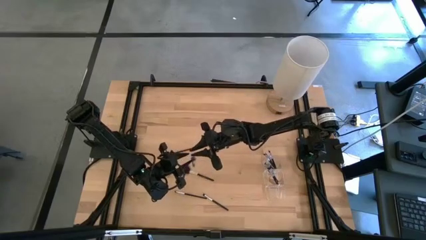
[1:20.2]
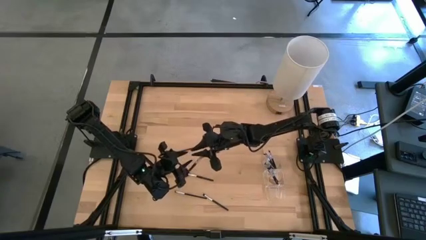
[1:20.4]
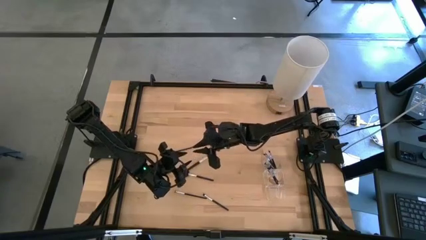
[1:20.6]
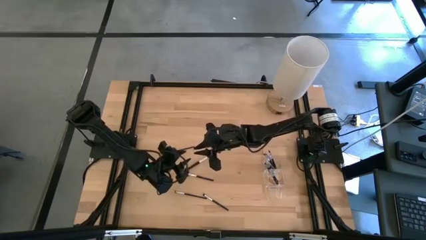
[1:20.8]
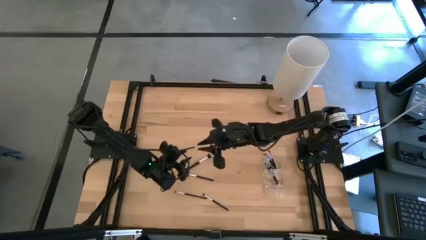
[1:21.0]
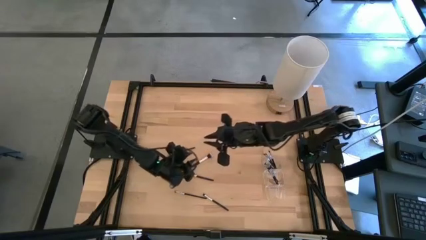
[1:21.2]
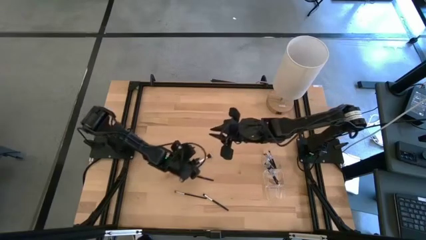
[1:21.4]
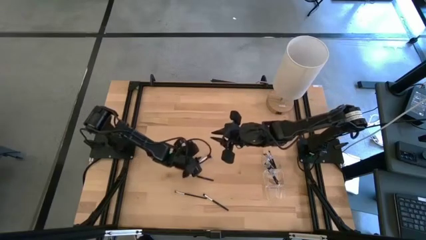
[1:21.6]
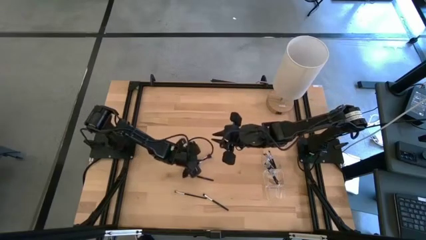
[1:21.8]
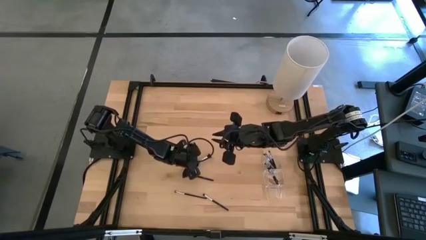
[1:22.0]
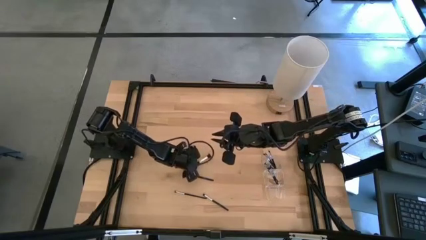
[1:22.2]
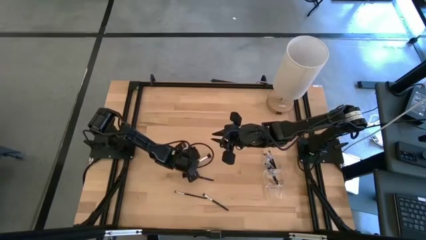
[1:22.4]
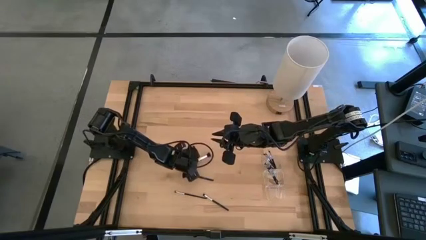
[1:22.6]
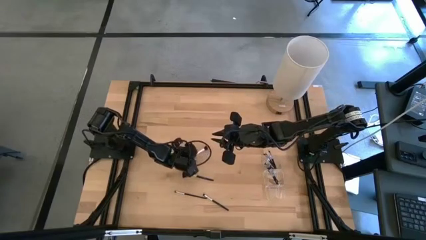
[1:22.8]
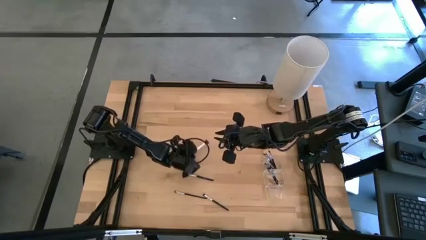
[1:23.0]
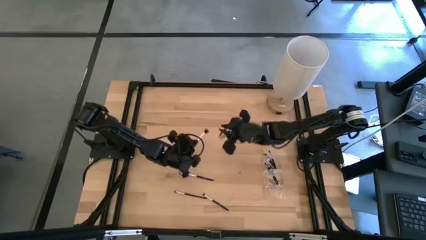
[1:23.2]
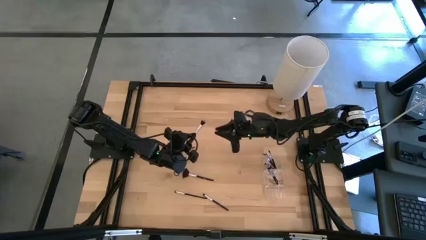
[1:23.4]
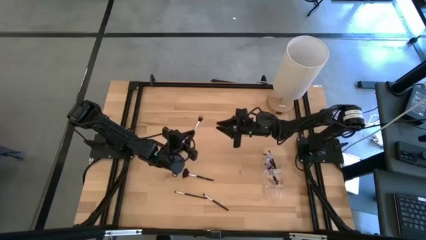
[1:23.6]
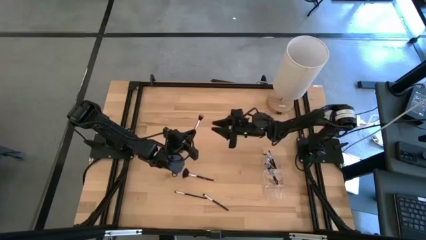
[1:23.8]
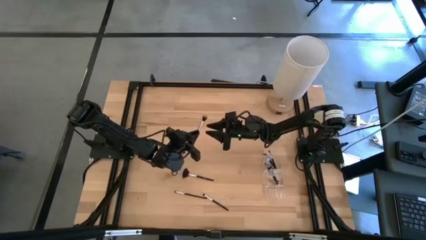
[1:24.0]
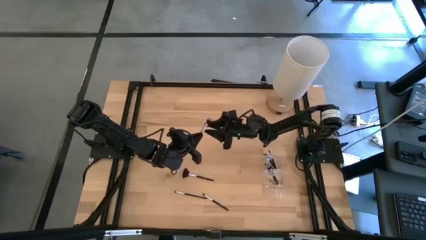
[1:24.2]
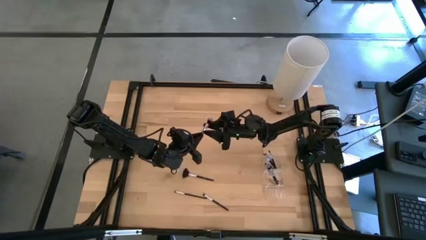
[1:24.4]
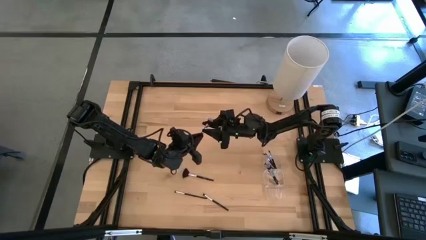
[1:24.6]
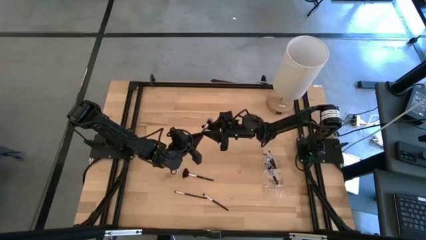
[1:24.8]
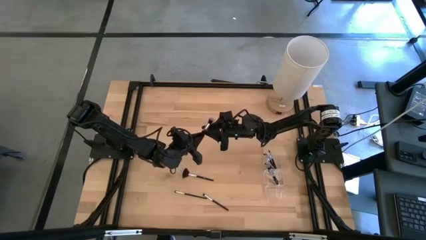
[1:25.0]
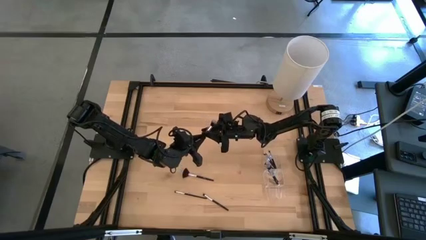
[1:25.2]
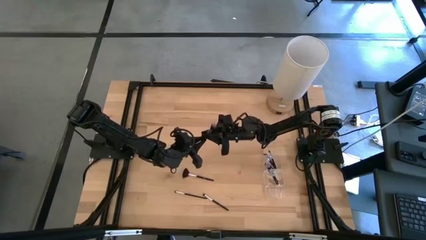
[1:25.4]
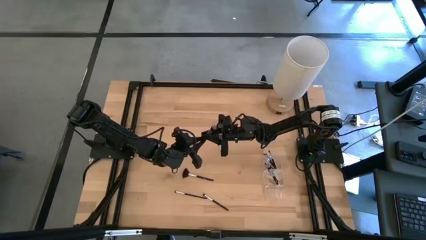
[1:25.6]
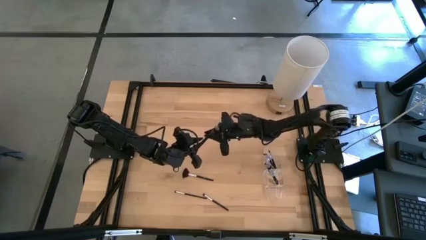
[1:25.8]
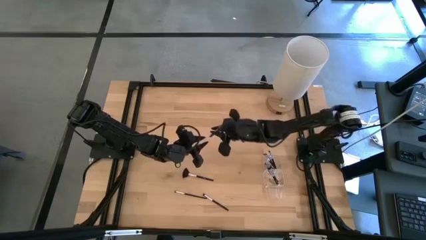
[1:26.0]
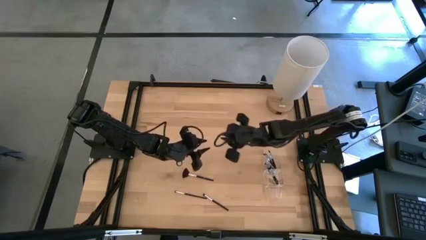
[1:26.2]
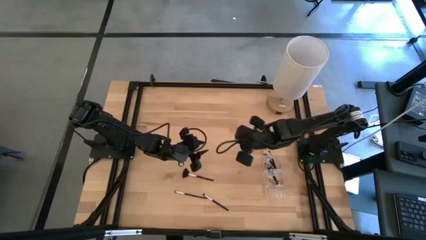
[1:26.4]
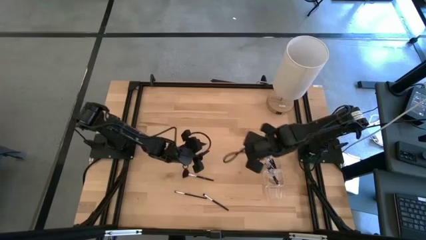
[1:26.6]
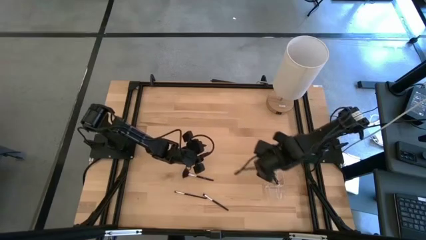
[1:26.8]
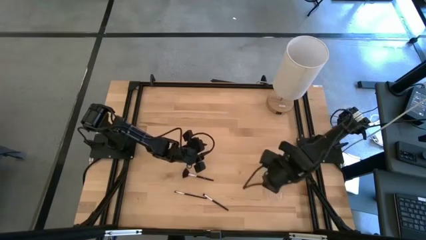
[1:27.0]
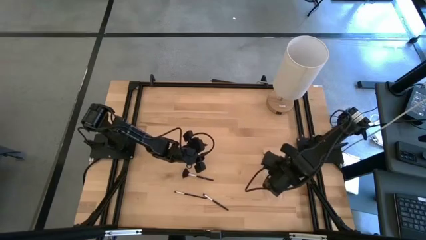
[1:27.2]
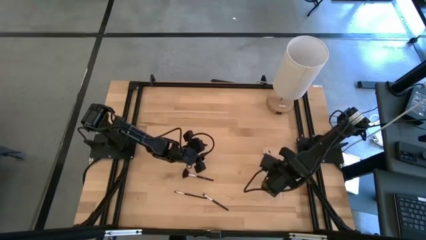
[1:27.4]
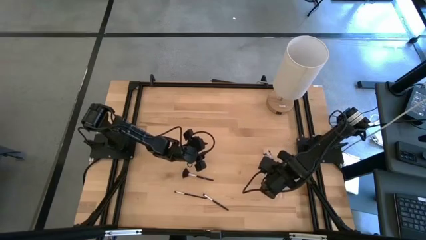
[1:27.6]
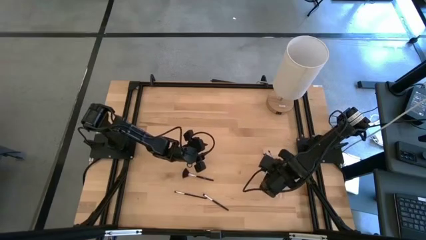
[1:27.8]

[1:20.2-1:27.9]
Task: Put items in baskets/containers
Put the powder brush into the middle section of the transparent organizer

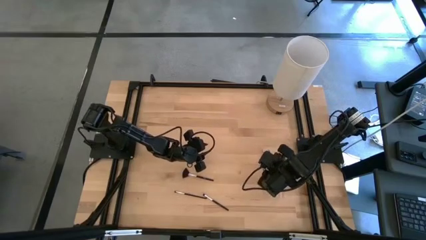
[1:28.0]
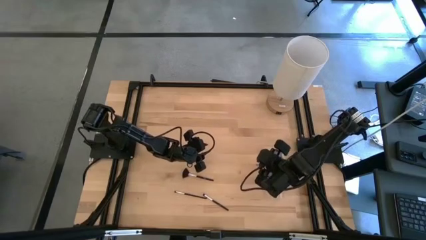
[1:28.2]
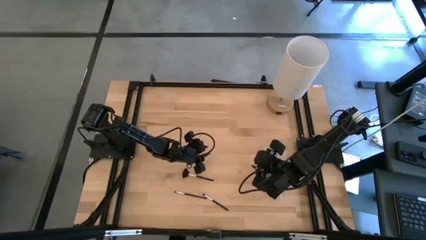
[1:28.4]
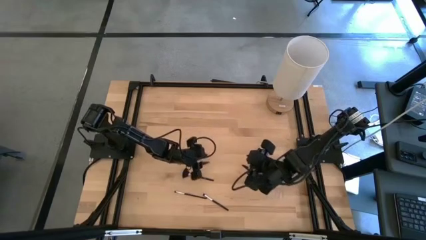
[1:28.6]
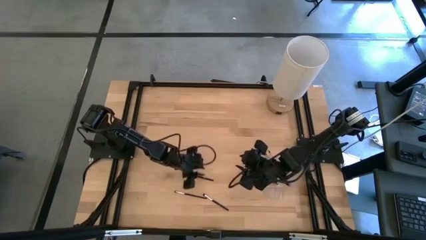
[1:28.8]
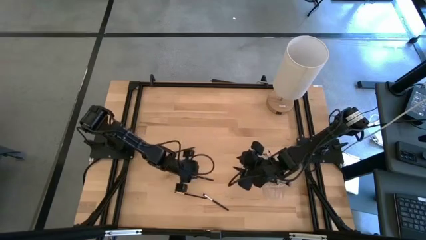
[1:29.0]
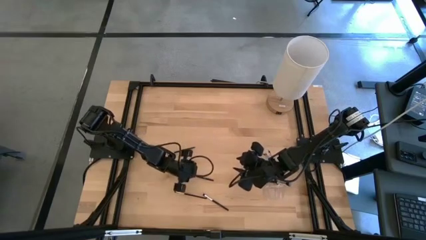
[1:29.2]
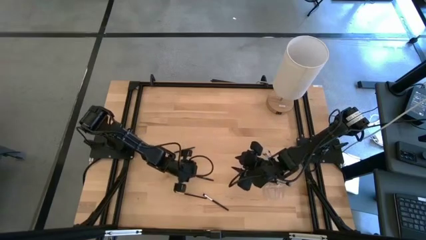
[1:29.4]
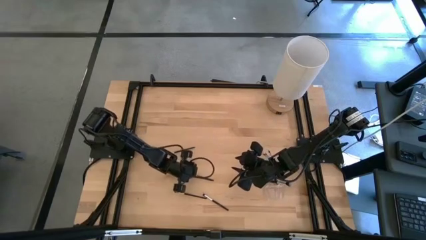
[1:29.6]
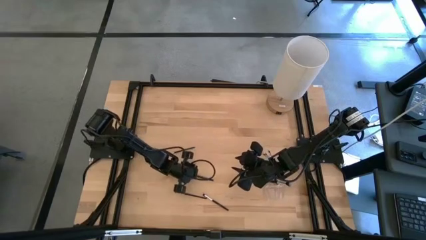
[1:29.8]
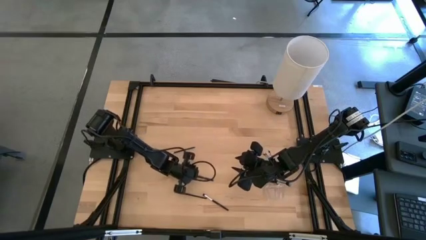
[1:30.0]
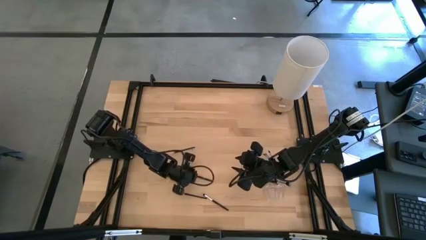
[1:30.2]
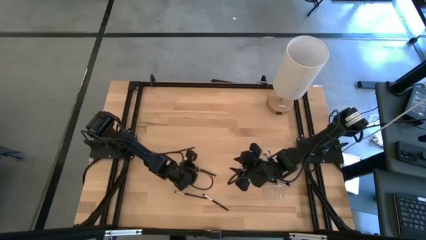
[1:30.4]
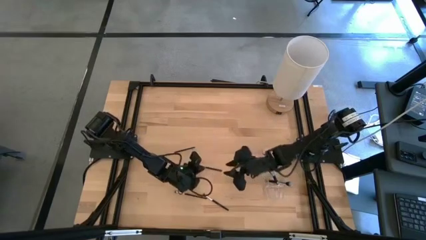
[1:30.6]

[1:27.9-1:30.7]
Put the highlighter brush into the middle section of the transparent organizer

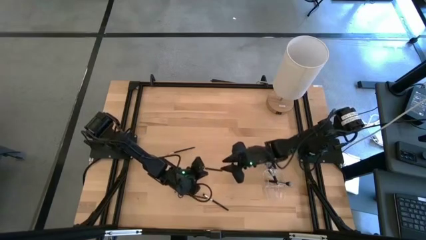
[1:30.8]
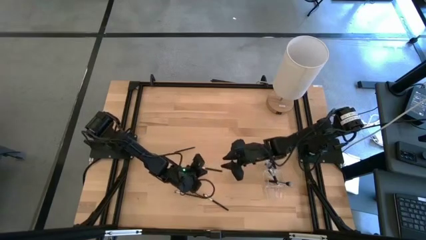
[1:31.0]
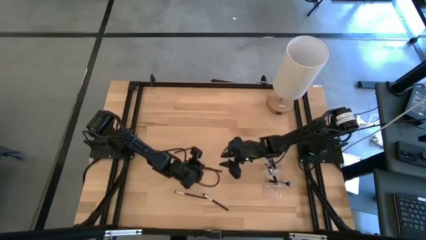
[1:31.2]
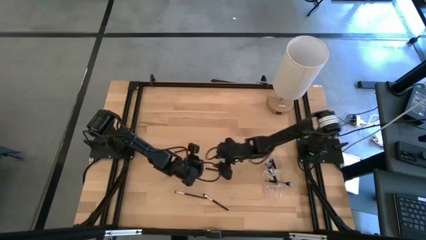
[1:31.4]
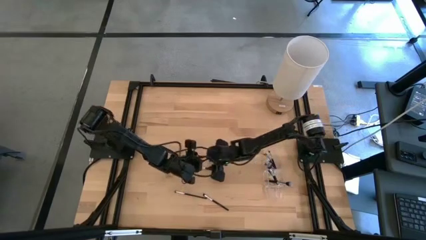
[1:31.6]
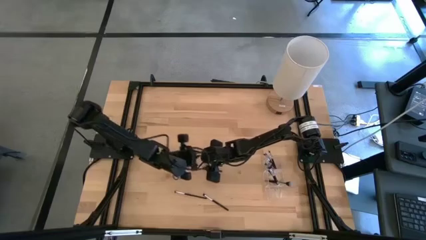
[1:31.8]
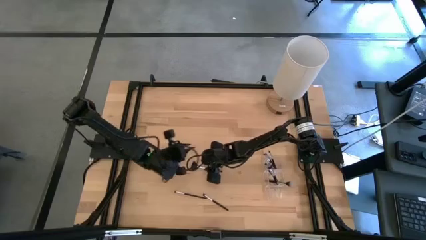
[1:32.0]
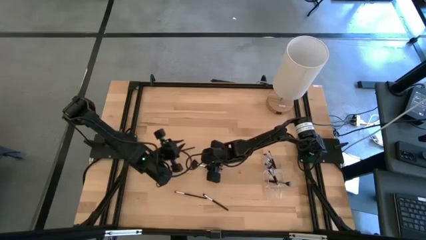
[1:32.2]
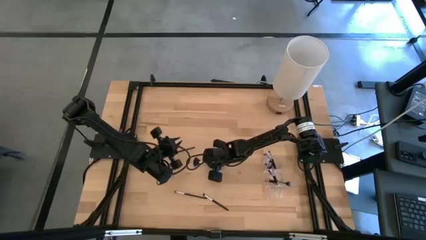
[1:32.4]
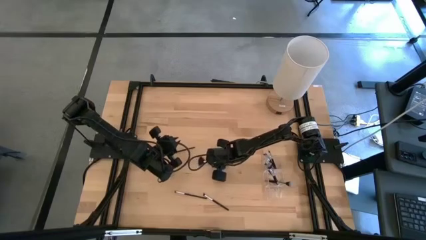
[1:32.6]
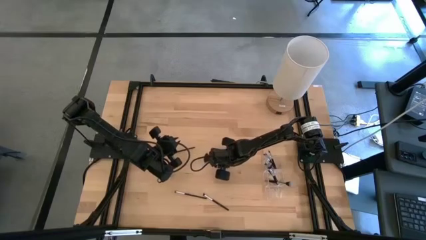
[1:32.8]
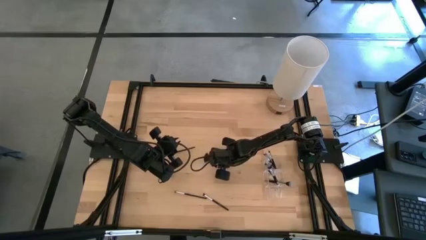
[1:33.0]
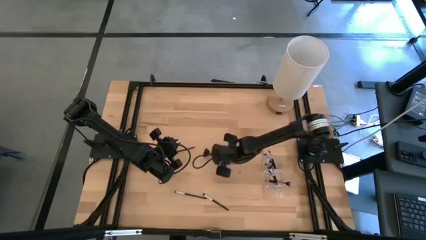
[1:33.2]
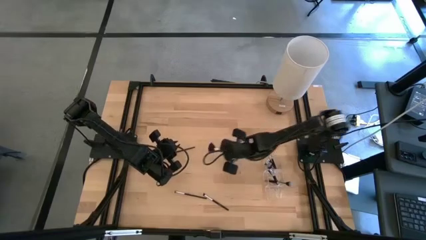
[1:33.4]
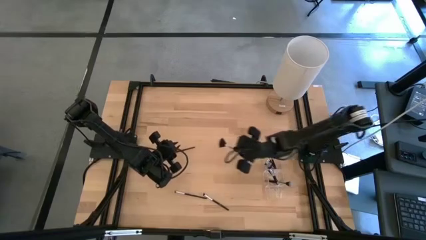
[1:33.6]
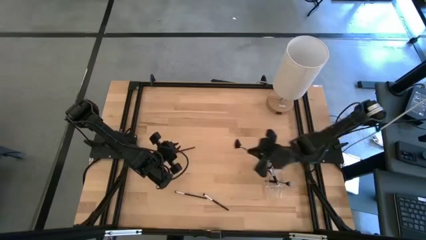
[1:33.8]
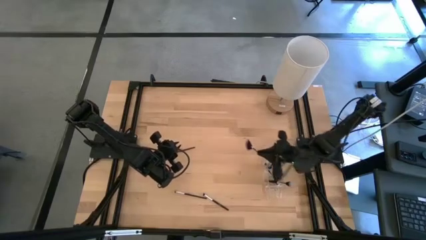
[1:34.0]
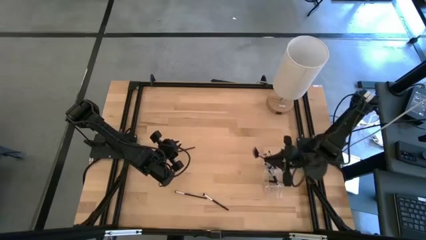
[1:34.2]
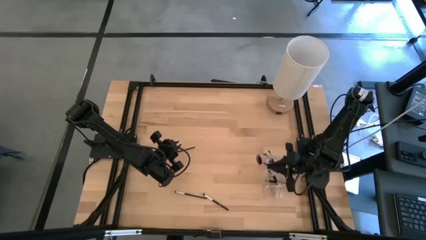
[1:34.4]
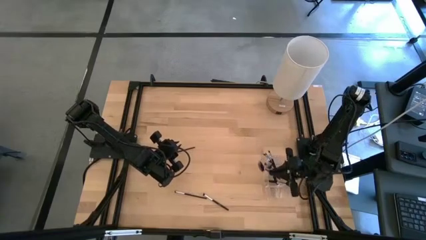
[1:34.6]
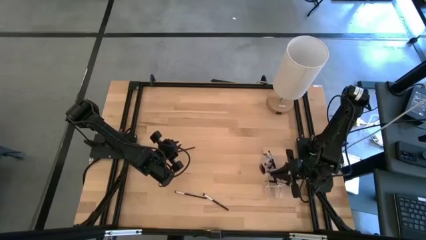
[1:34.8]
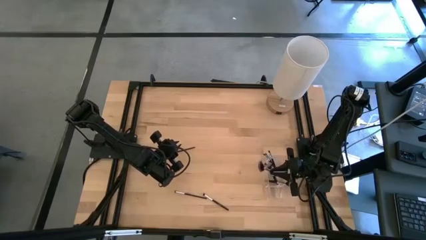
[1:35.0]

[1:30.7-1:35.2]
Put the highlighter brush into the middle section of the transparent organizer
